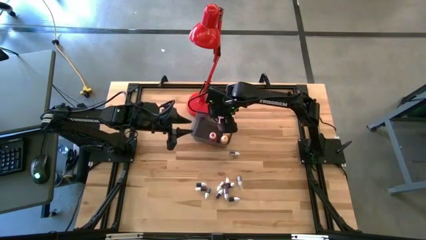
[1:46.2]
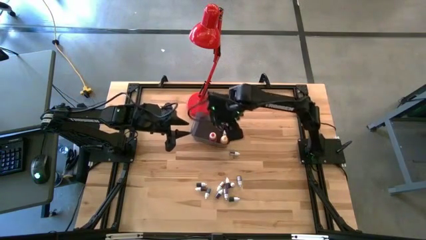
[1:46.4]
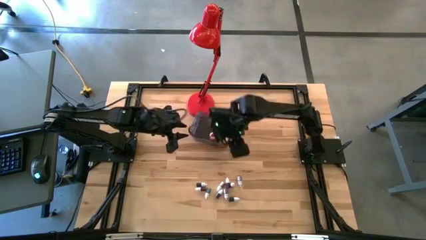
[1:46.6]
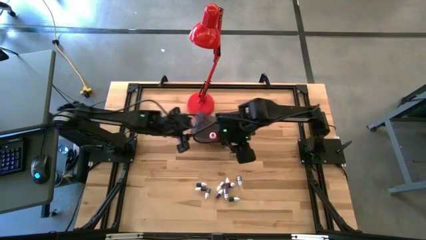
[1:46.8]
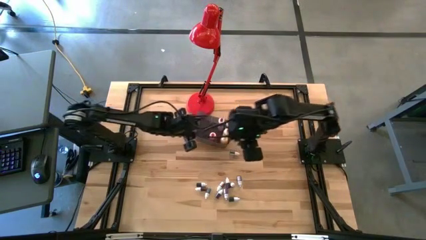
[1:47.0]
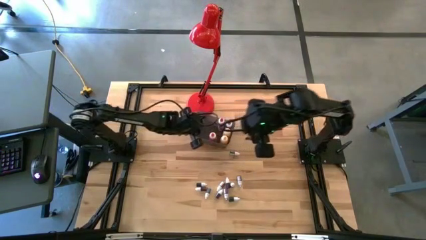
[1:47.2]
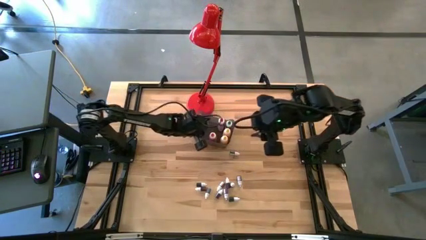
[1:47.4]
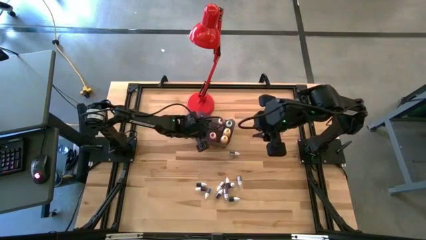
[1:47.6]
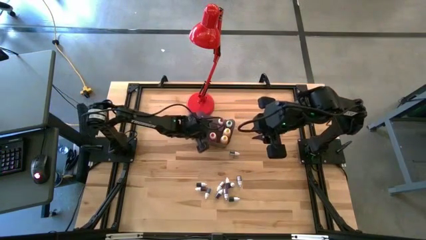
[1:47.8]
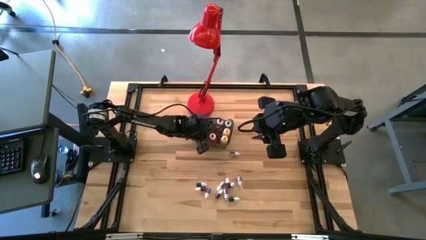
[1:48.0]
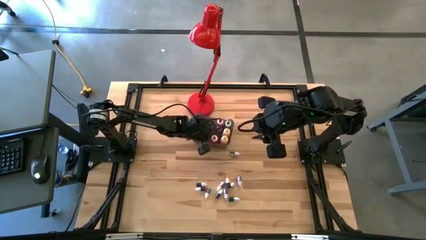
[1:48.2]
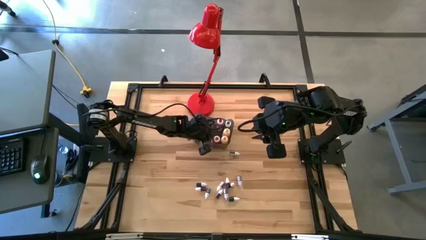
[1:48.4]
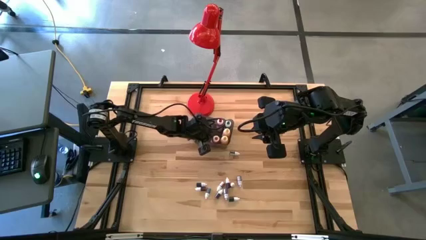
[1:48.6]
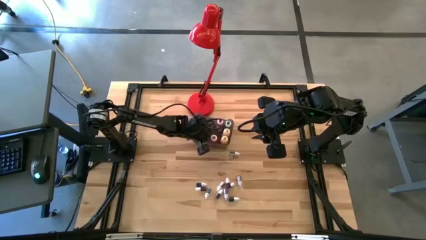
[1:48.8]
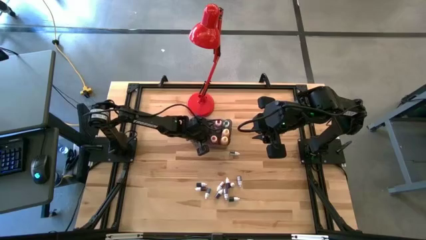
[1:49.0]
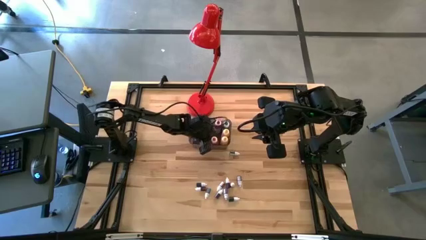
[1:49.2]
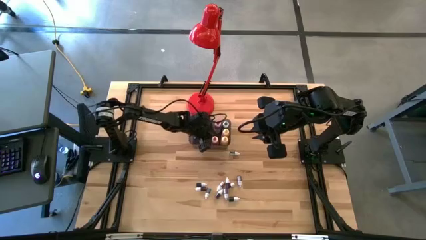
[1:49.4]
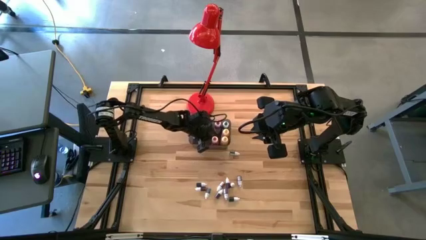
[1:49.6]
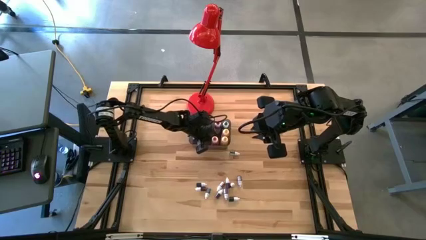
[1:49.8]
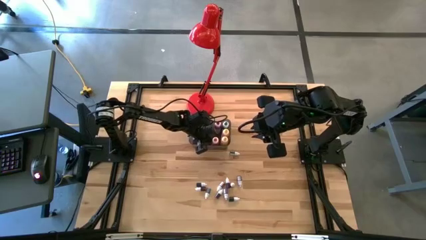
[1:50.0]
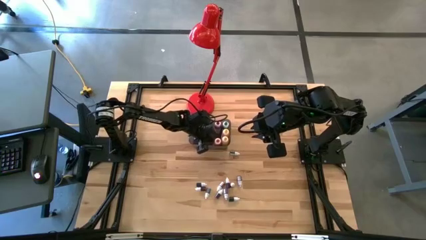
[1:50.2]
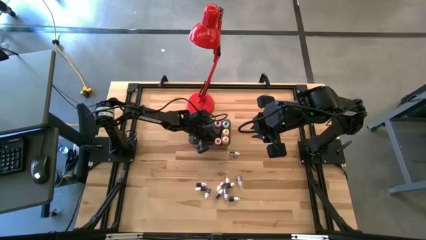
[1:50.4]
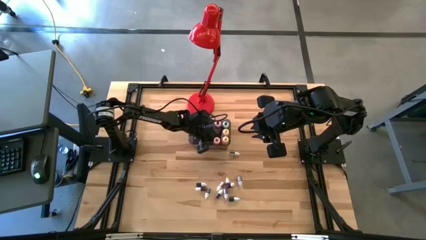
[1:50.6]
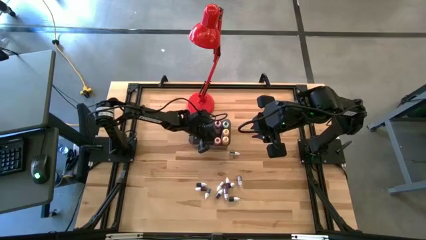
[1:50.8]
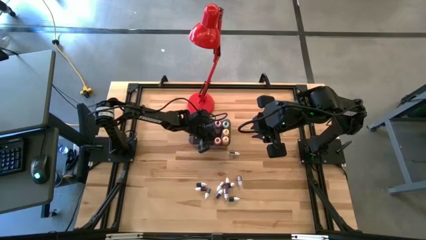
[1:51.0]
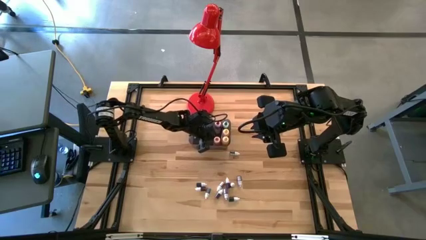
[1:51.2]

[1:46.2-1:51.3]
Task: Pick & Place food coloring
Adjust the large orange food coloring bottle in the black bin

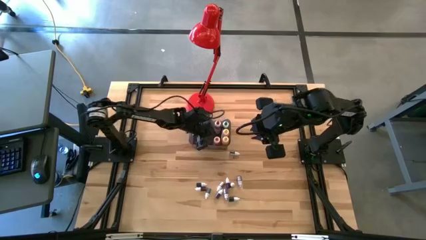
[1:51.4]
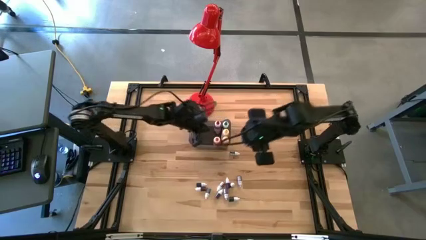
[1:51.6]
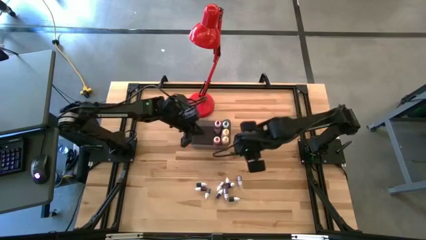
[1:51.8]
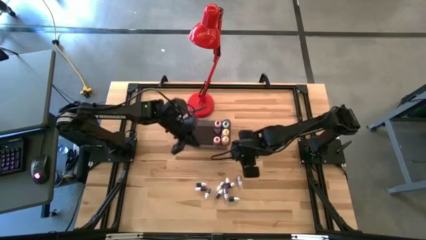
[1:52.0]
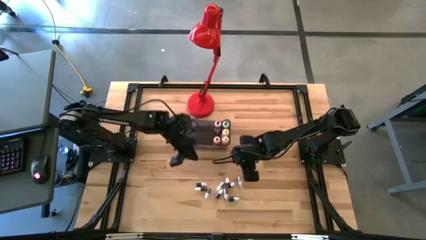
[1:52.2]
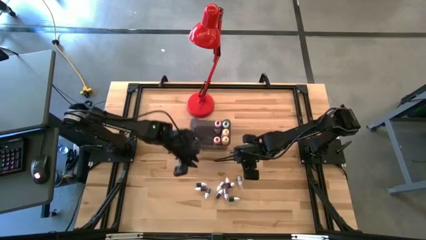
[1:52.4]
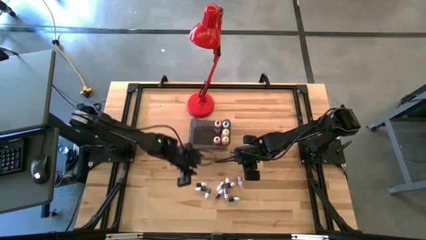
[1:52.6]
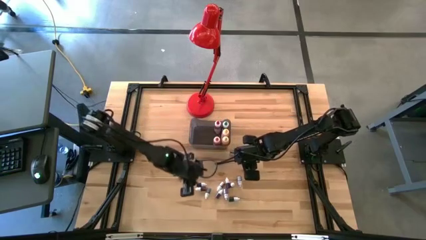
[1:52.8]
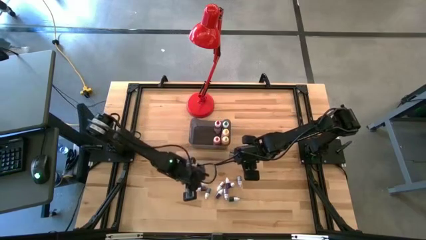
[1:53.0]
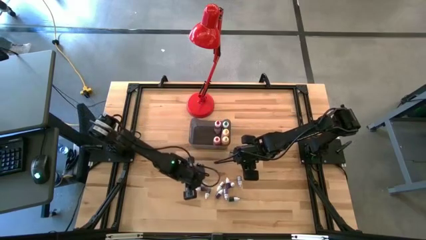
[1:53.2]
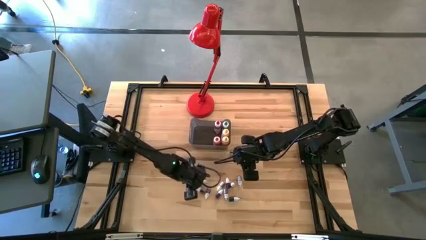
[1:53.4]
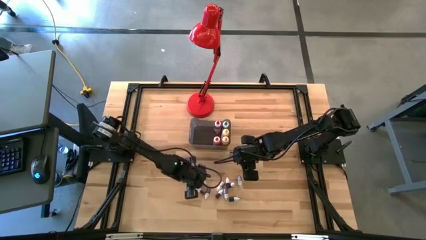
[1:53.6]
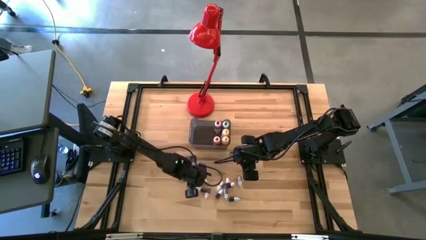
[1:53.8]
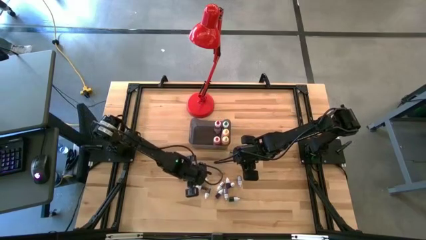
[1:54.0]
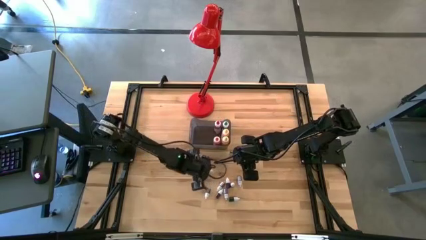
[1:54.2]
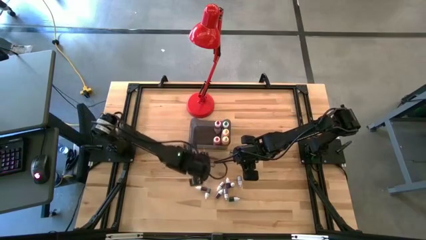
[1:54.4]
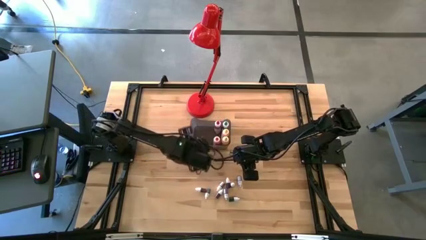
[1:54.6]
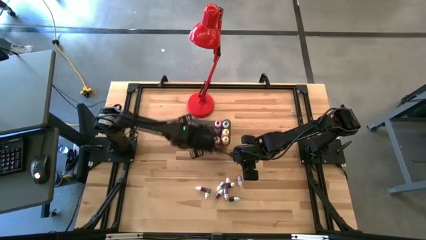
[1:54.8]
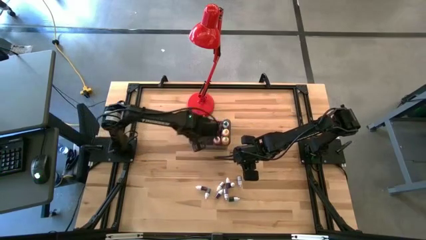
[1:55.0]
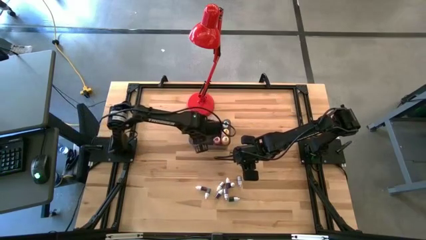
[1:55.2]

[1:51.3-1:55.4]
Put the top small green food coloring bottle into the black bin

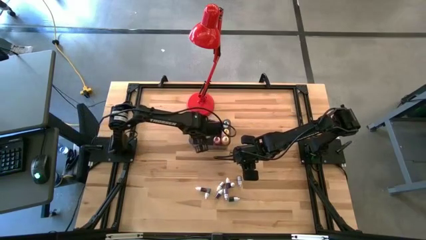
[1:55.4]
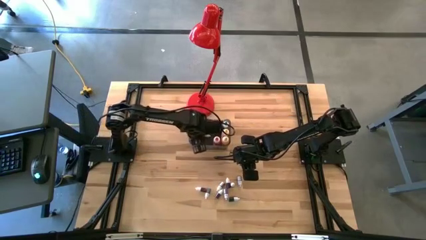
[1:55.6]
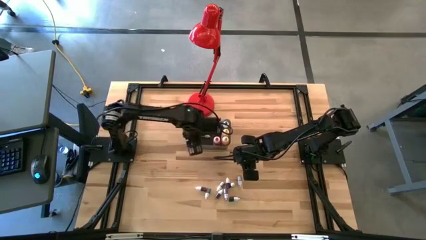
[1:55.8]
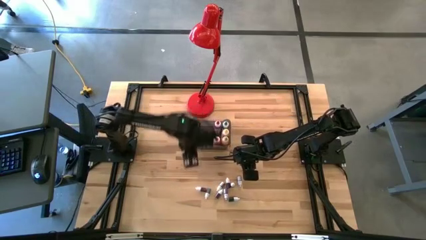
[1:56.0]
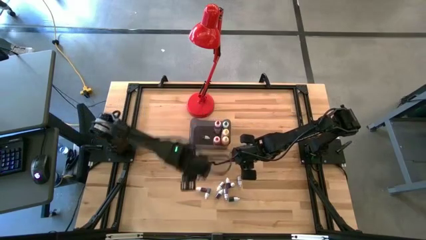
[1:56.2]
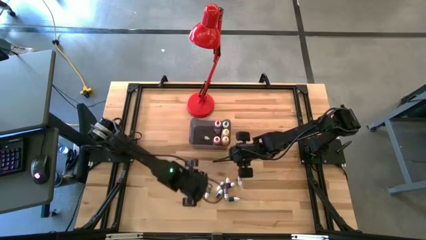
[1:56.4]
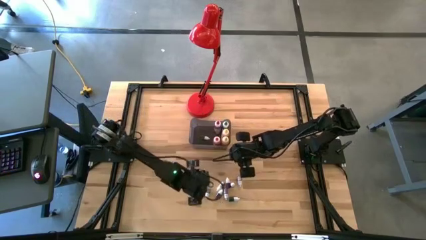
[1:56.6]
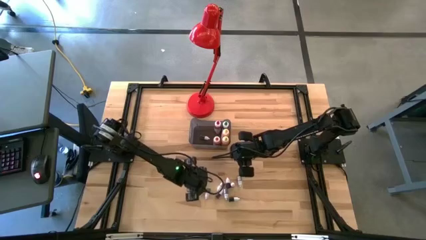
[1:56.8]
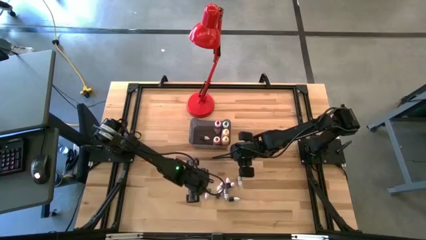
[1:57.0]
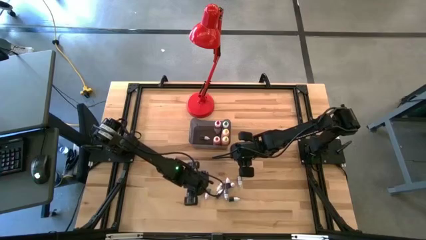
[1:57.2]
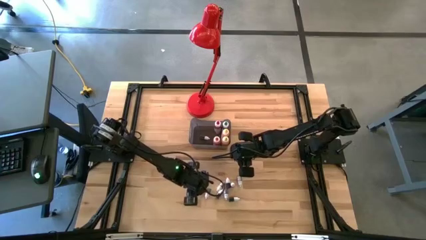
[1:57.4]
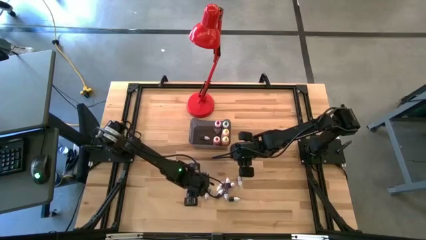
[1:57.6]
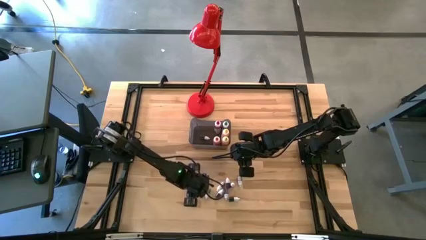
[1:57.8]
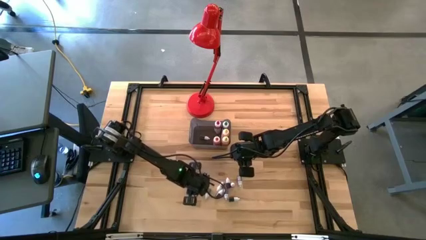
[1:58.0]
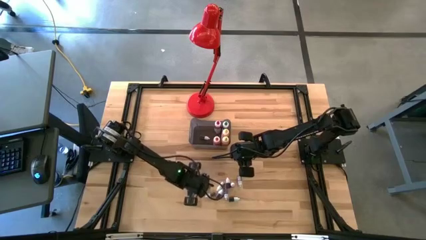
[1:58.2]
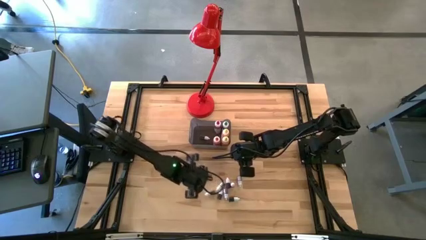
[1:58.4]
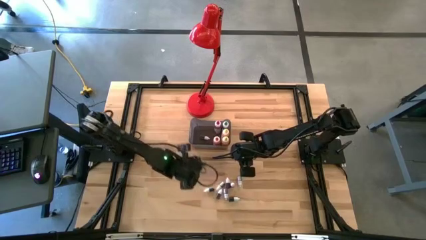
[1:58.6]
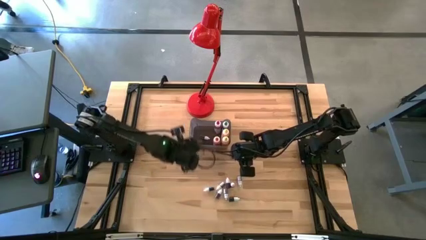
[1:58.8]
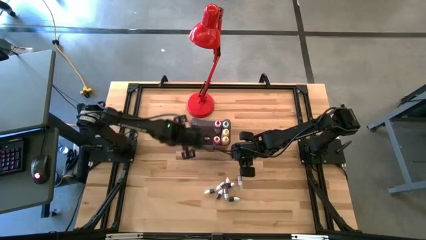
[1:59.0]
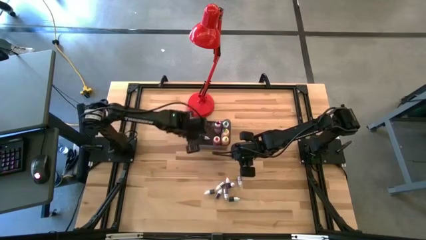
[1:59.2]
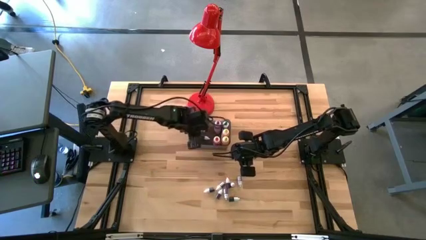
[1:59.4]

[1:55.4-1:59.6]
Put the small orange food coloring bottle into the black bin

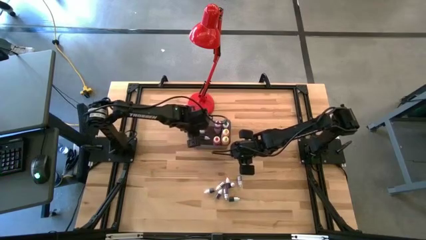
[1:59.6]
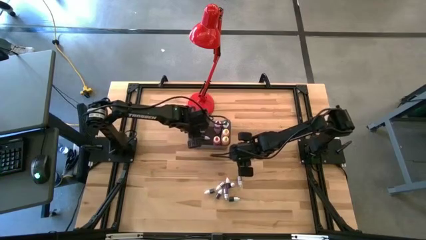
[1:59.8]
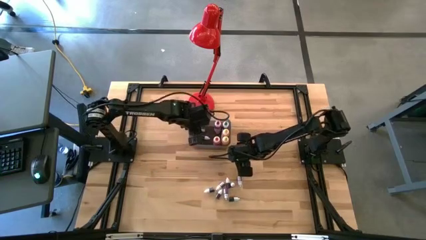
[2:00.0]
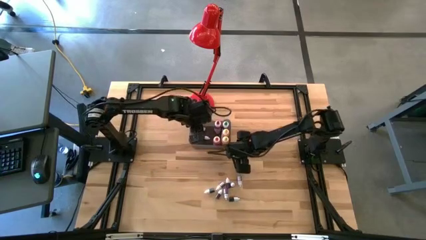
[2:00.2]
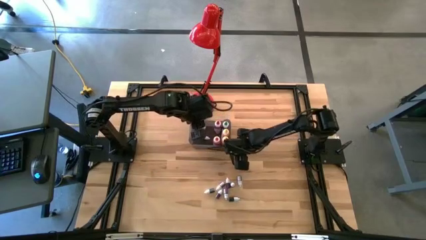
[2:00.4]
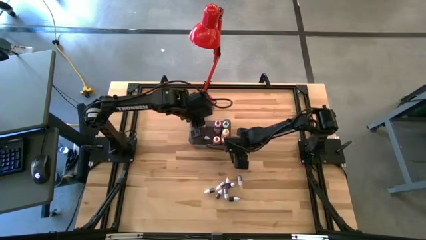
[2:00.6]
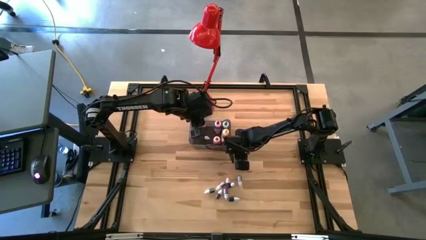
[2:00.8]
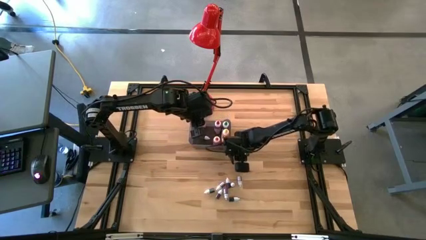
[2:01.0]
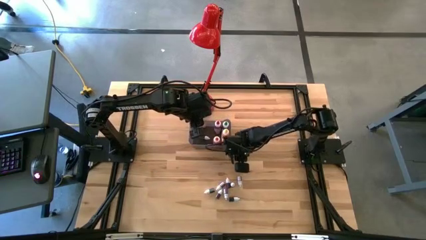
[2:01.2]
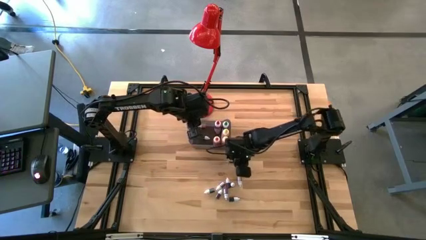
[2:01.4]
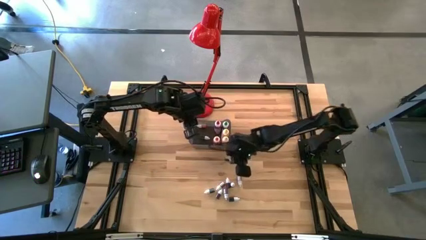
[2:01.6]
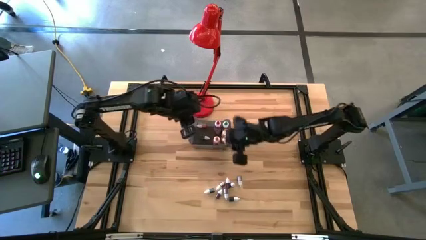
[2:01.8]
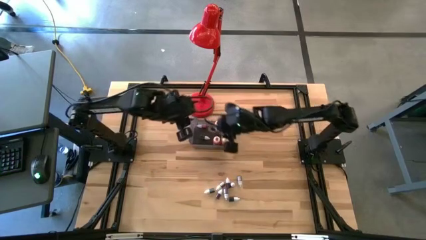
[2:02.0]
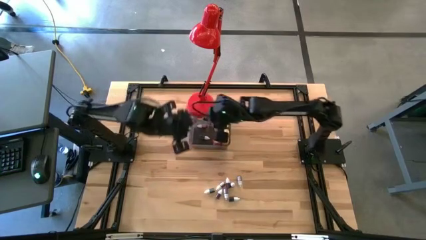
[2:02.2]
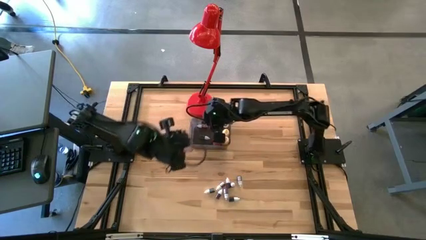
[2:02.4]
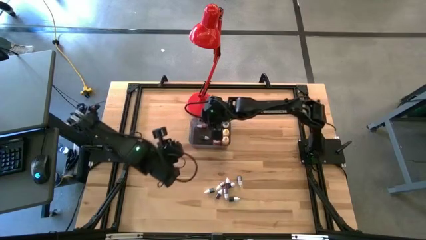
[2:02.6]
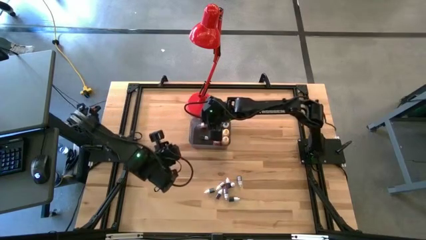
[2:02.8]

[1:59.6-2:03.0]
Put the small black food coloring bottle into the black bin

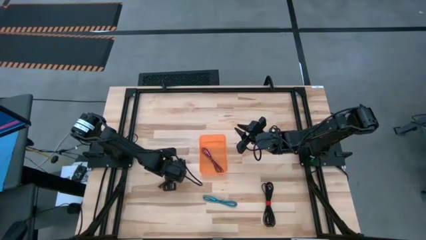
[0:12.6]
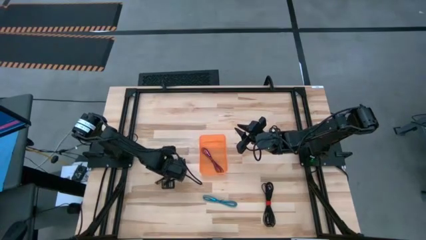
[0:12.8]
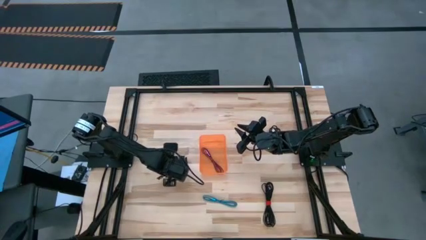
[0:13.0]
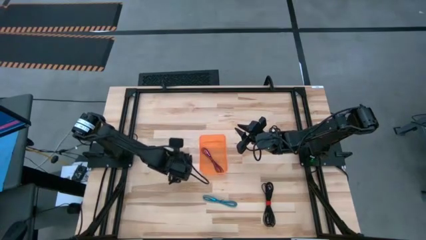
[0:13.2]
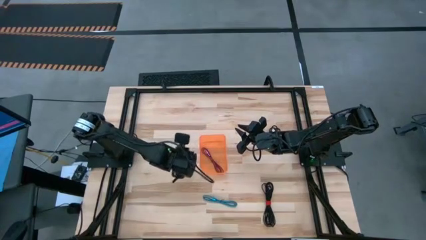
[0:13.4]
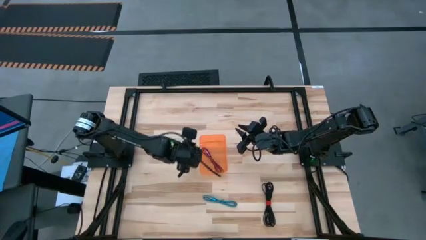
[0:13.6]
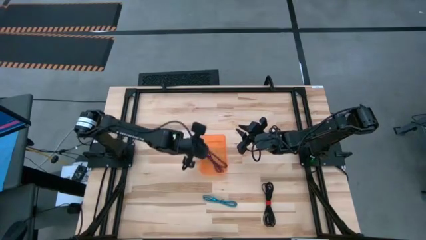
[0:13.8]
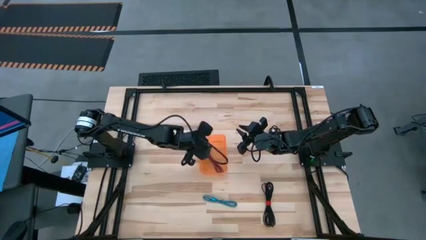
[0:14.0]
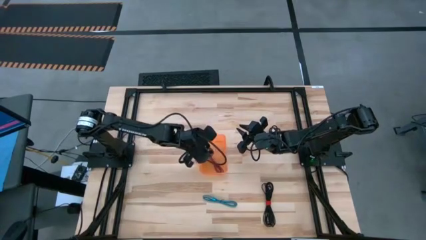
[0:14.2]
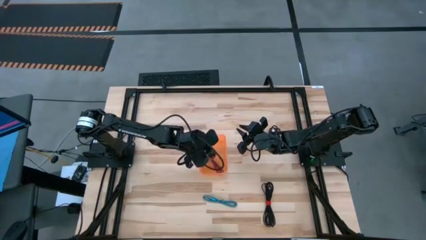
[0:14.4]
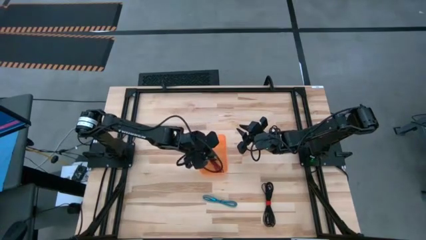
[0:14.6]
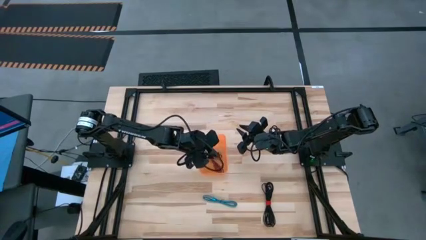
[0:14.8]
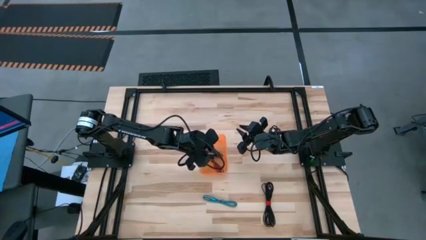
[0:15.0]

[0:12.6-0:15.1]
Task: Pick and place USB-C Cables
Put the left black charger cable into the orange bin
